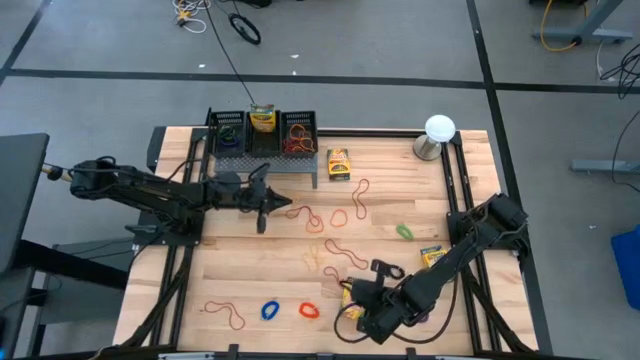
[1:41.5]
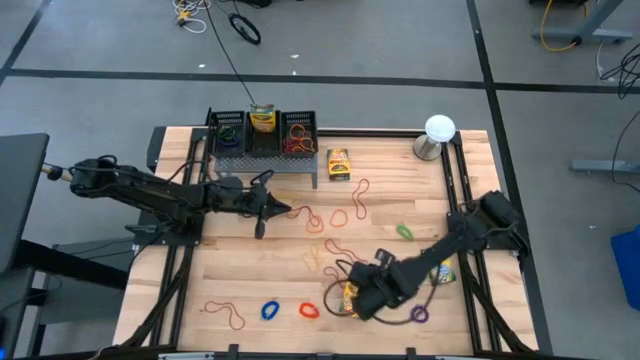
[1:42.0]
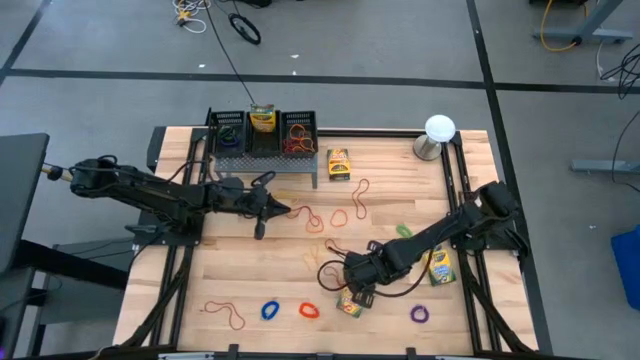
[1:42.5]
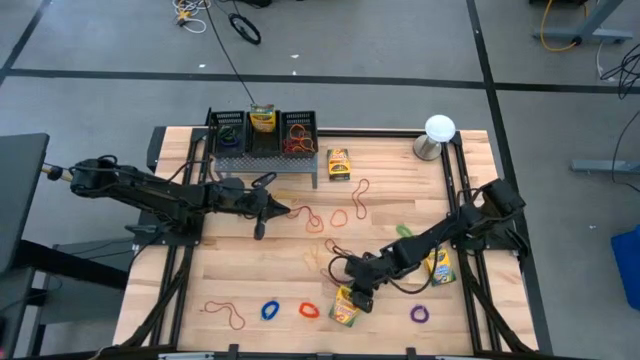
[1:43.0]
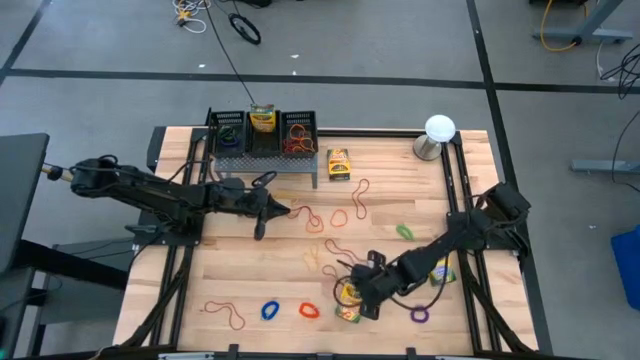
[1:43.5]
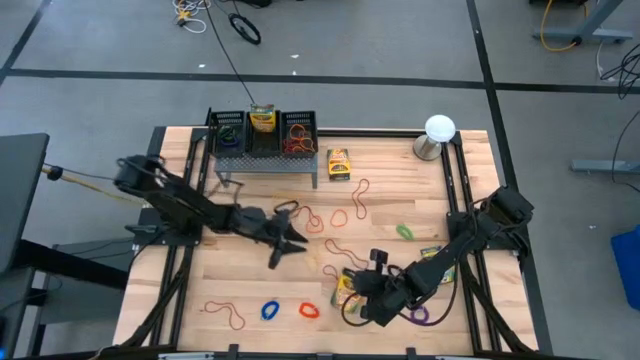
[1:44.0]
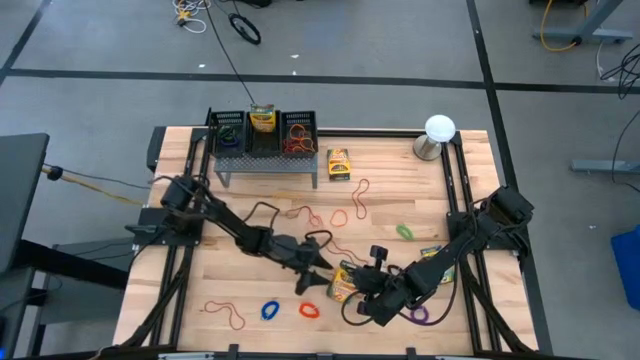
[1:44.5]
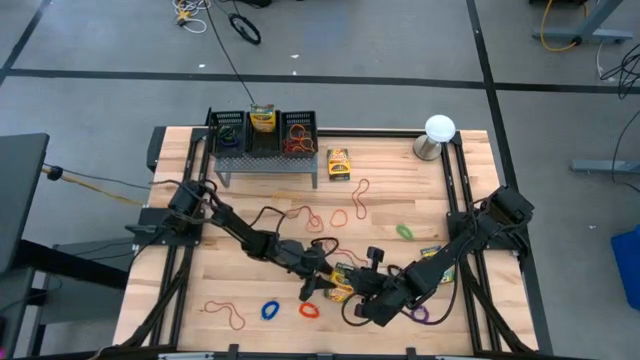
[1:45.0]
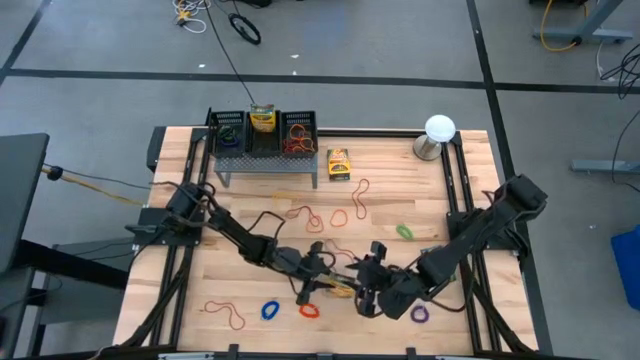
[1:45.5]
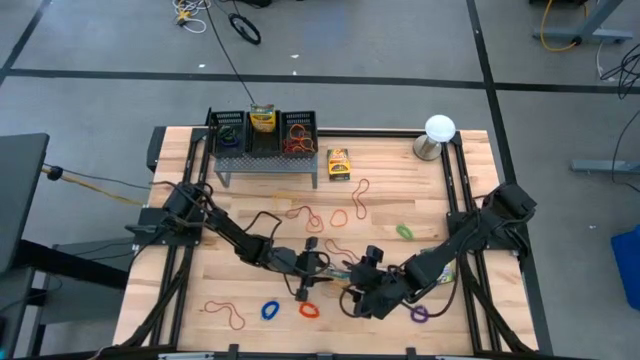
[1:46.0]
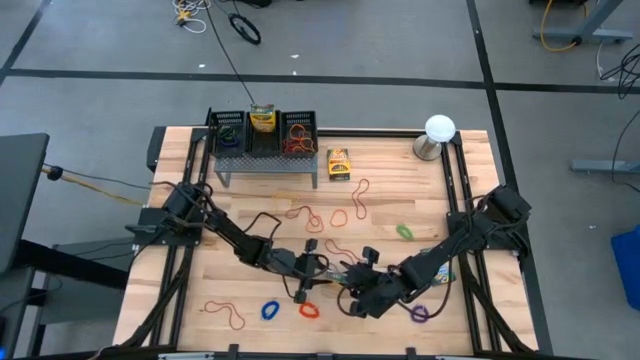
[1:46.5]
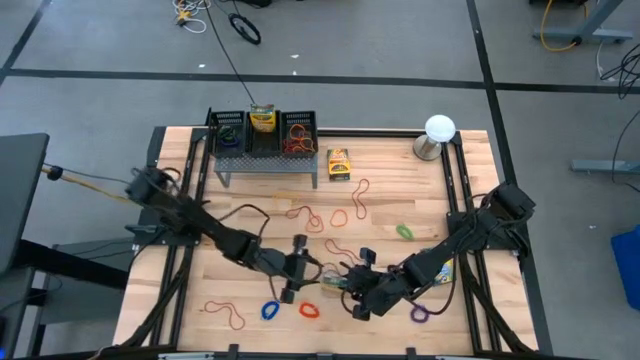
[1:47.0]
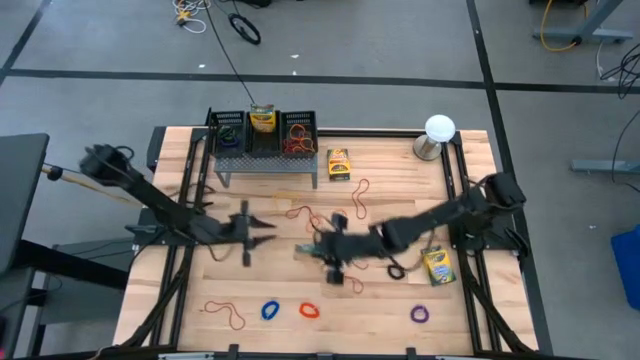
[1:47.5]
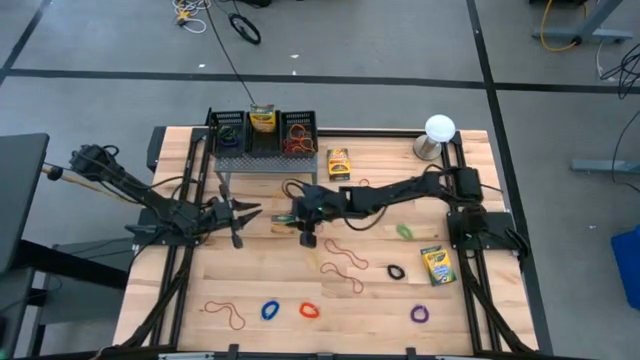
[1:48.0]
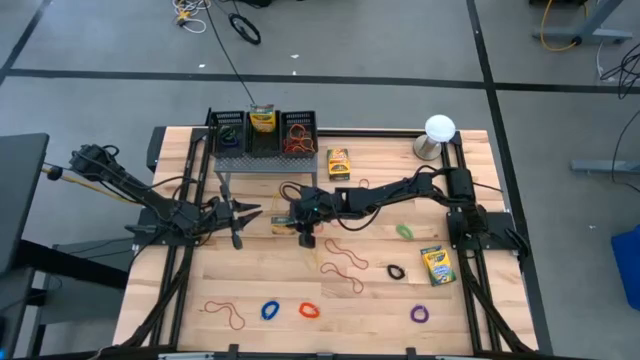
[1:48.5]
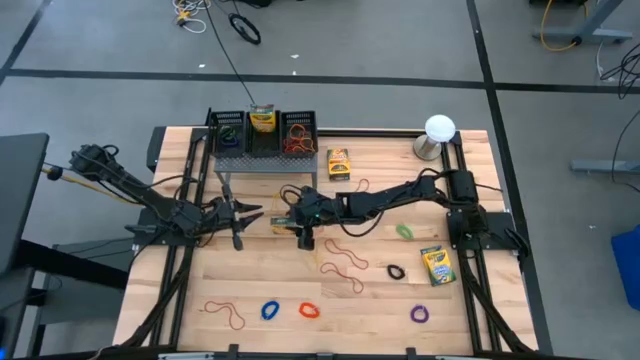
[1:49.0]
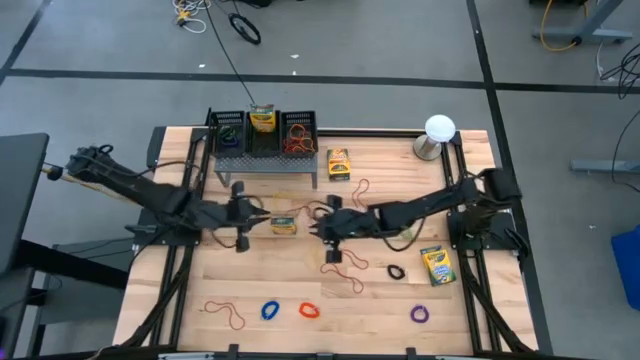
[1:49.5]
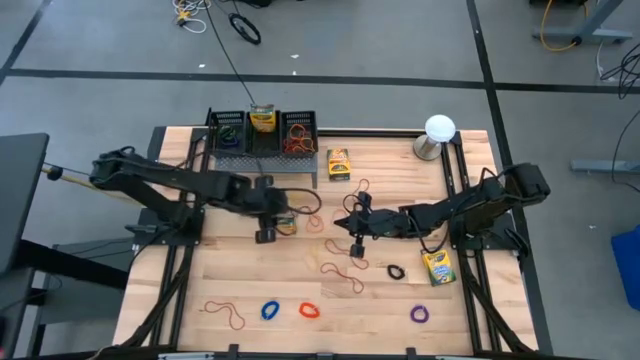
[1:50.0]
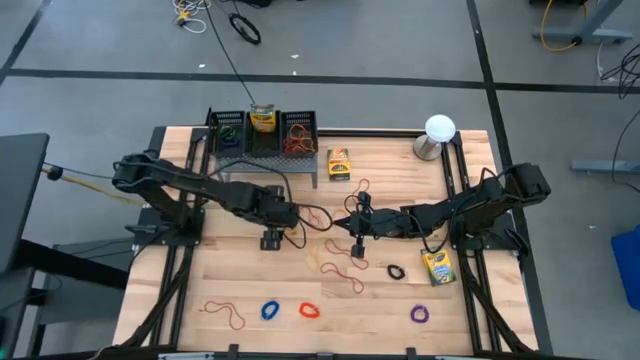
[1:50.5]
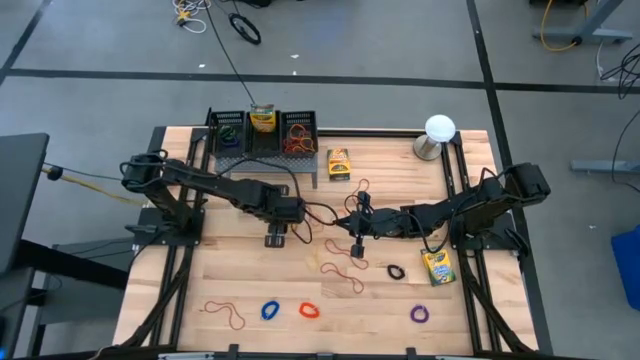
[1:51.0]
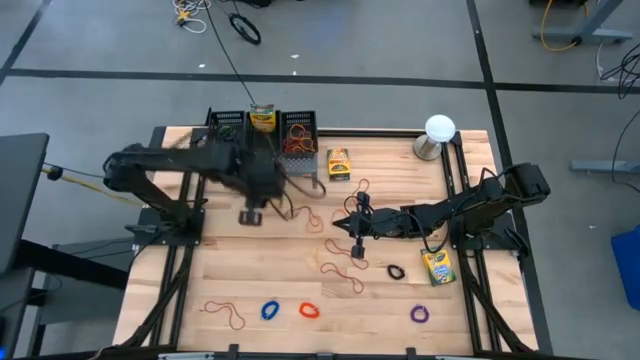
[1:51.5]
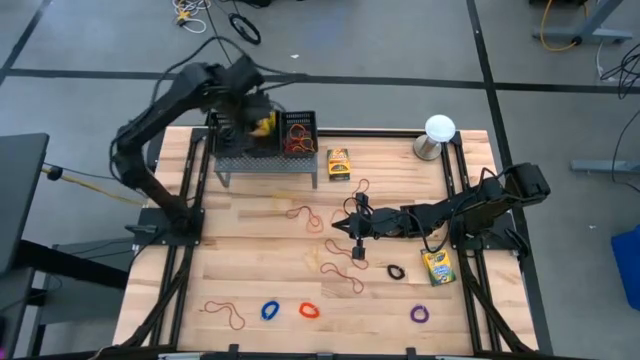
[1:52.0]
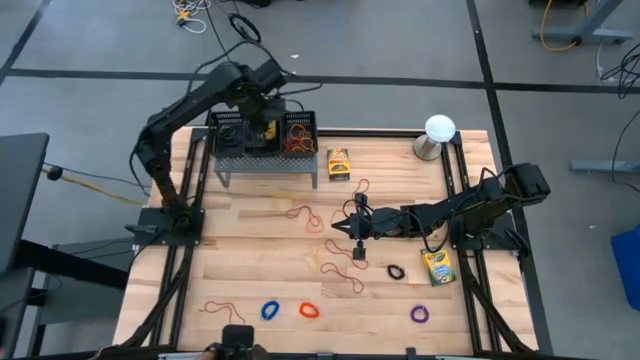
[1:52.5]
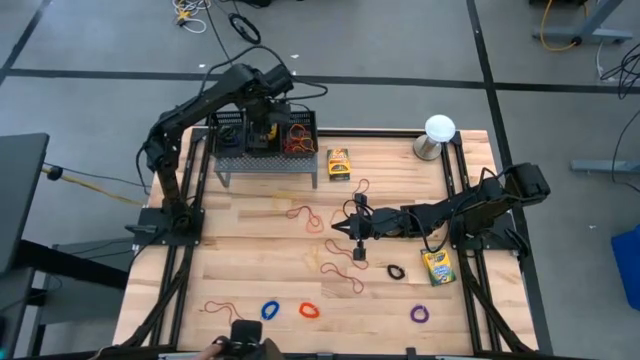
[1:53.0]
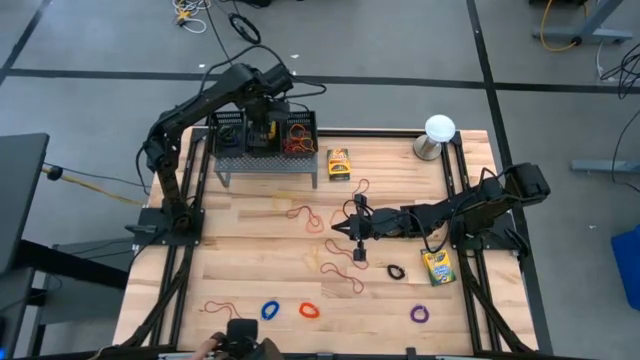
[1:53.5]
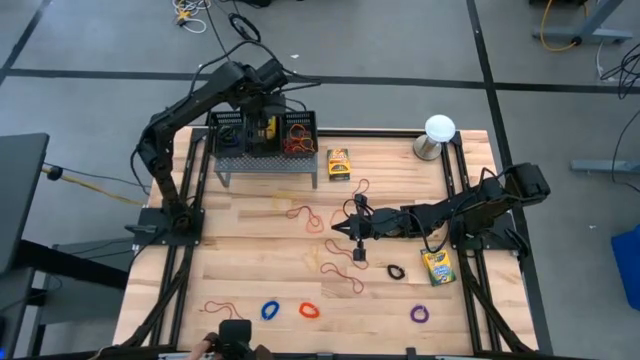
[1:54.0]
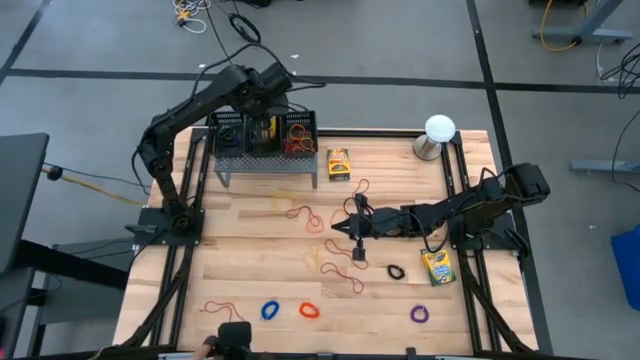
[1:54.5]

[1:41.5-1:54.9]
Task: Pick & Place Office Desk Supplies
Put the yellow crayon box into the middle black bin

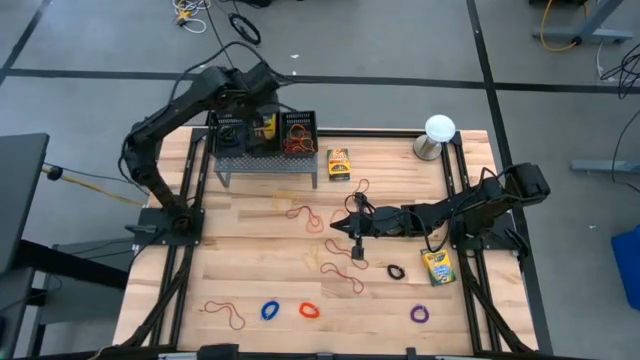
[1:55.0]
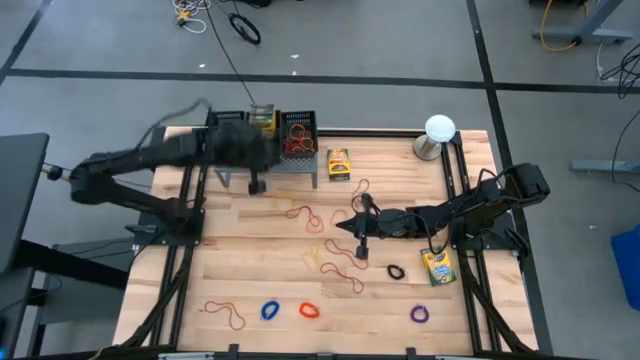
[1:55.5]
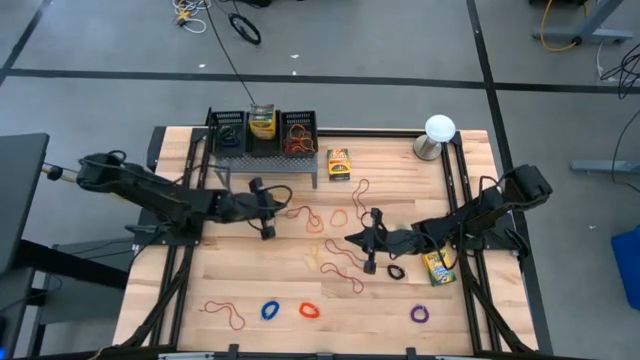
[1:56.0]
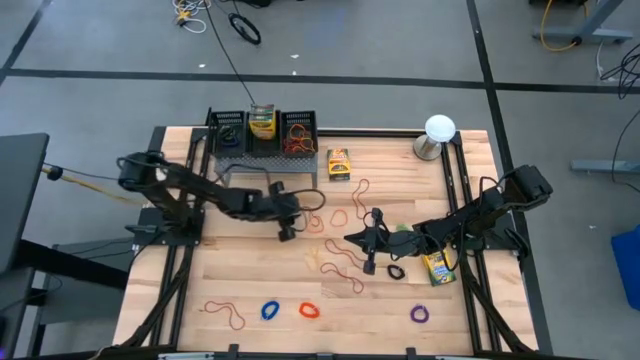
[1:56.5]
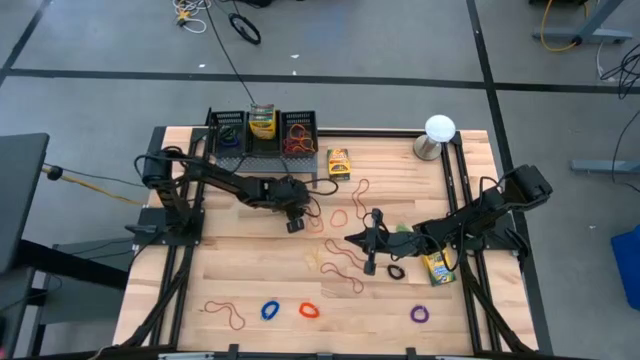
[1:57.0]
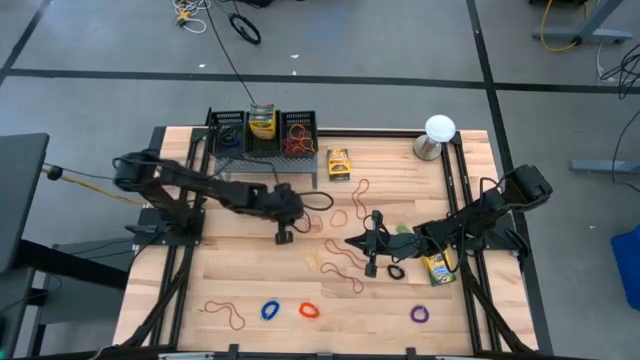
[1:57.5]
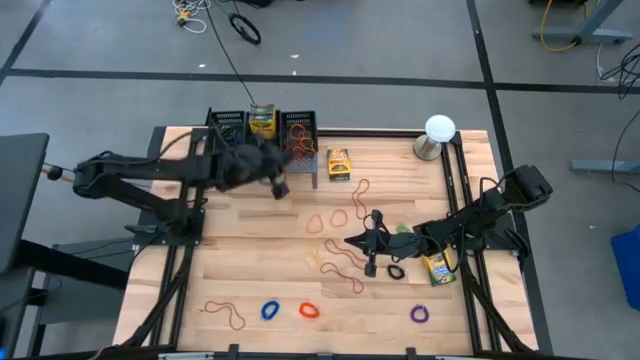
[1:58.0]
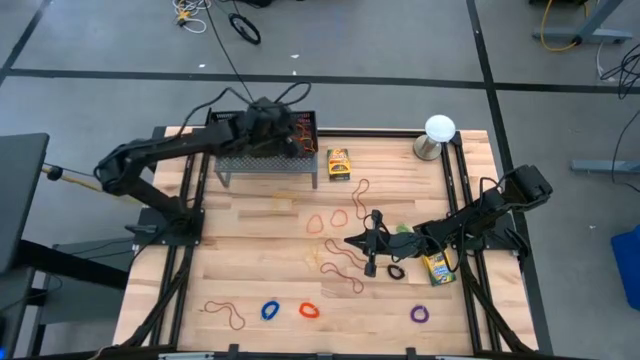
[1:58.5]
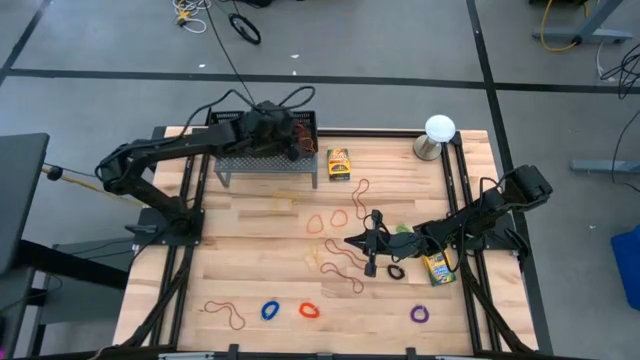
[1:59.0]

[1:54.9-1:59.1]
Put the red rubber band into the right black bin

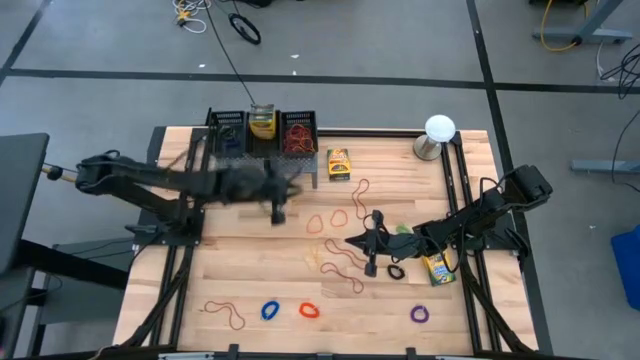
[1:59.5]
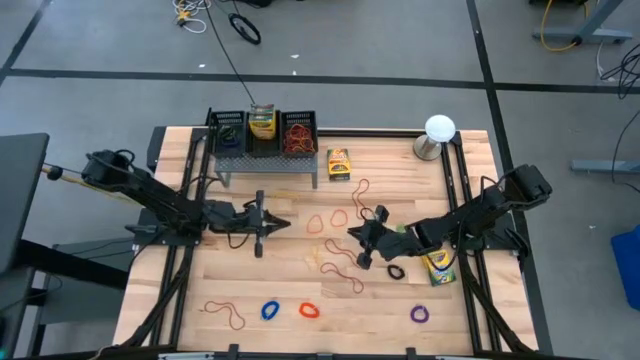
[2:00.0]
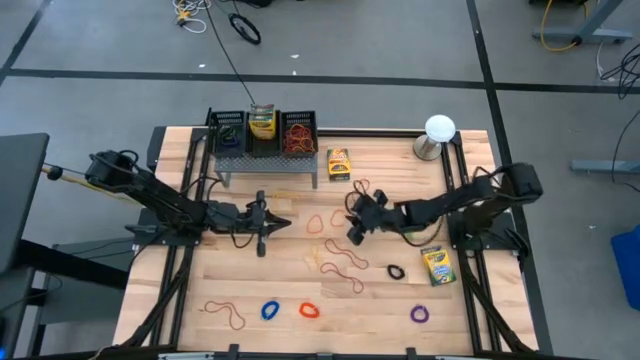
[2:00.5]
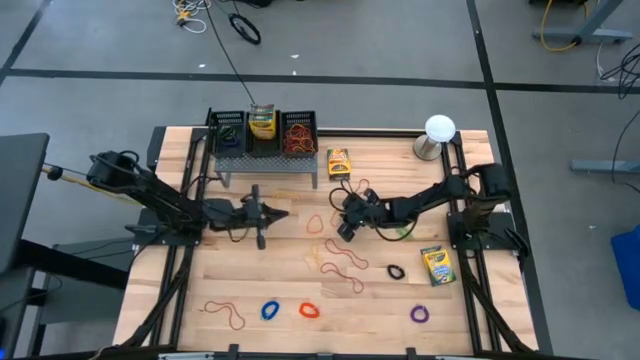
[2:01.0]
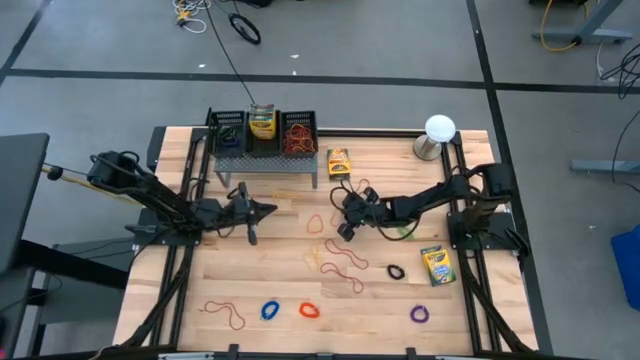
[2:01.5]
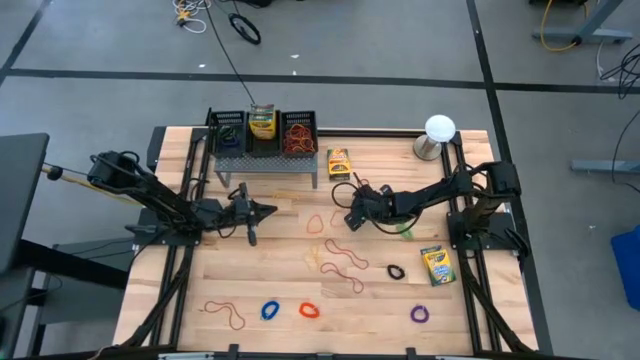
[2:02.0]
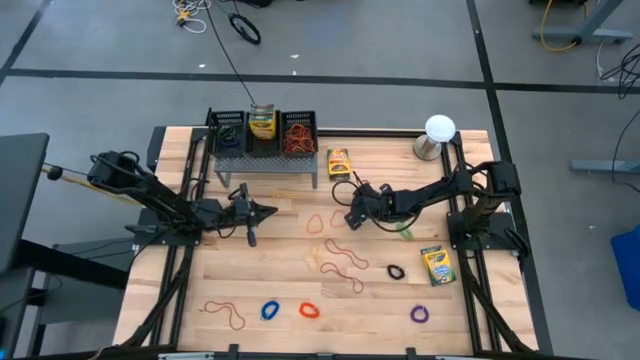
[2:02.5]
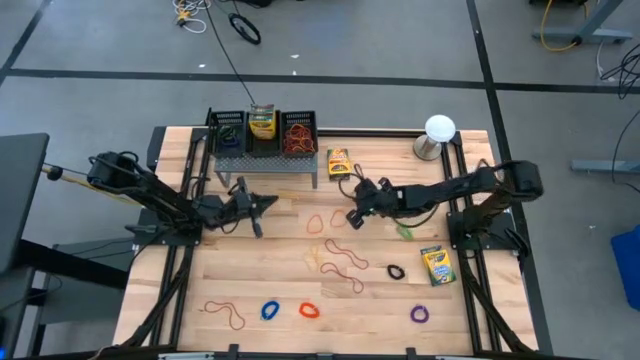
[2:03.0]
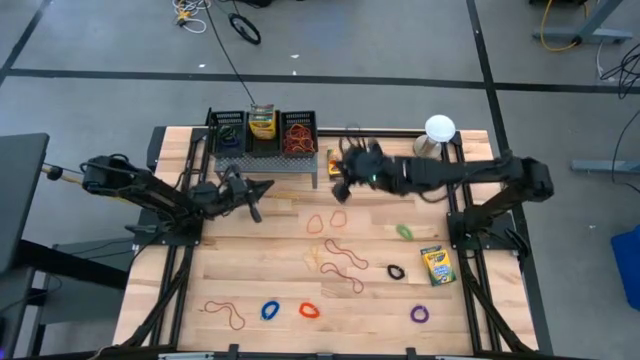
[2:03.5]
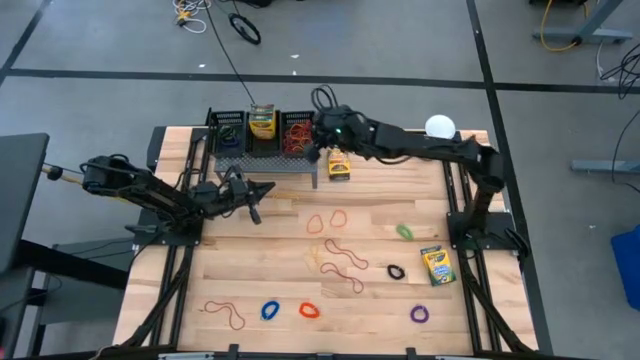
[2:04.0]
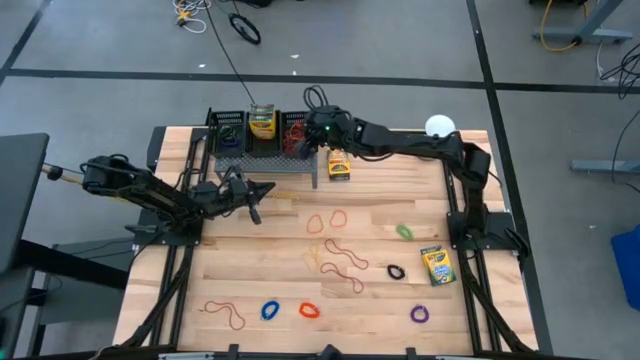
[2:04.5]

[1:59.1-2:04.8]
Put the red rubber band into the right black bin
